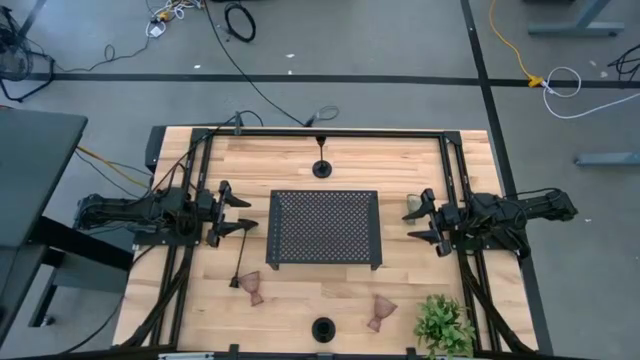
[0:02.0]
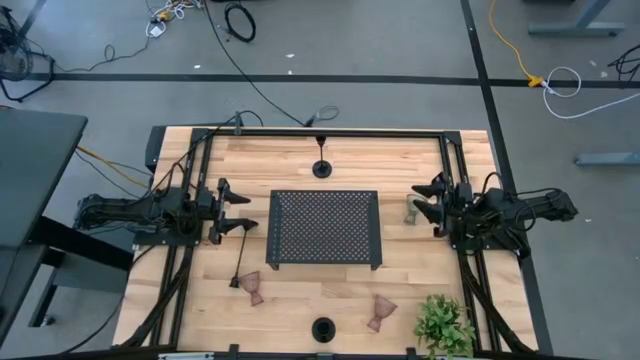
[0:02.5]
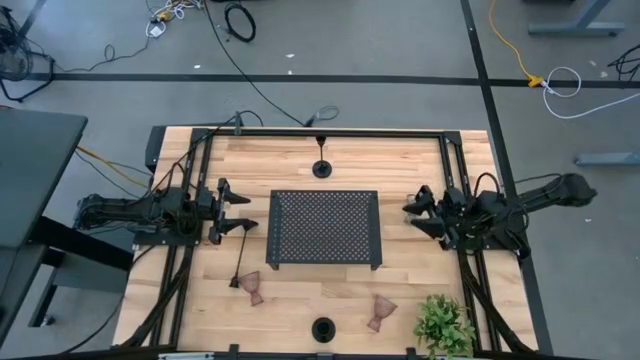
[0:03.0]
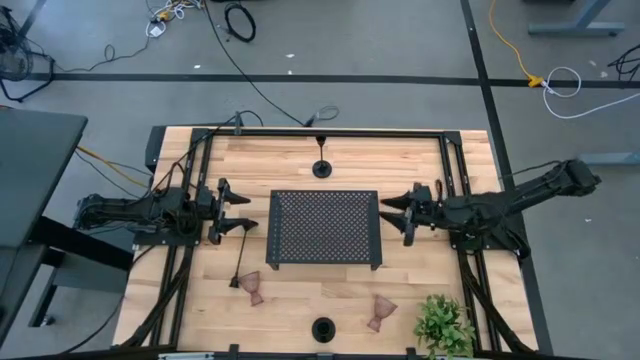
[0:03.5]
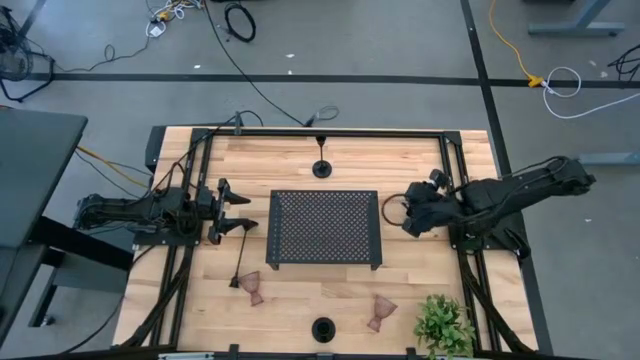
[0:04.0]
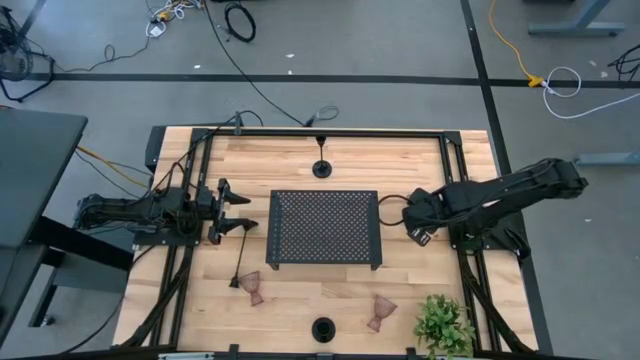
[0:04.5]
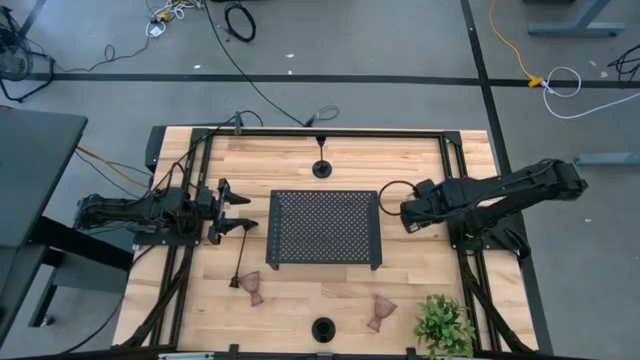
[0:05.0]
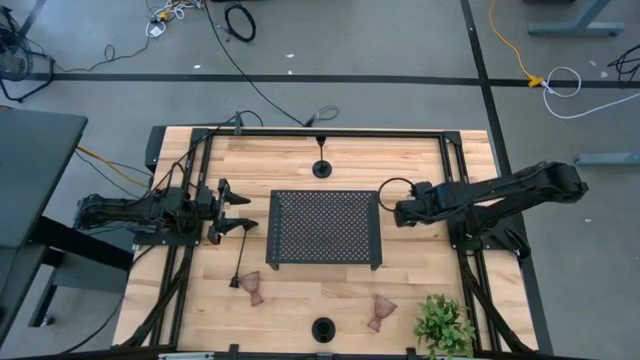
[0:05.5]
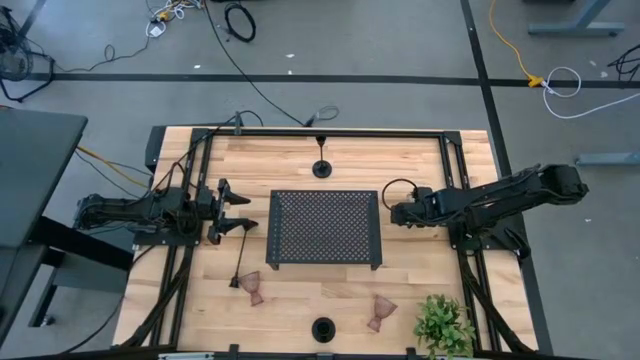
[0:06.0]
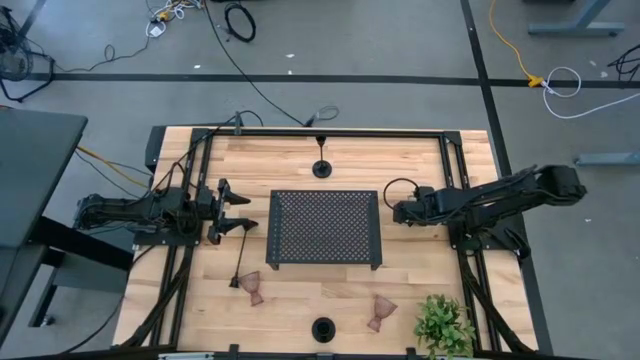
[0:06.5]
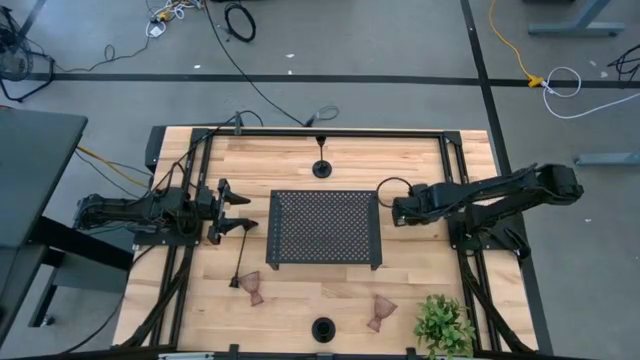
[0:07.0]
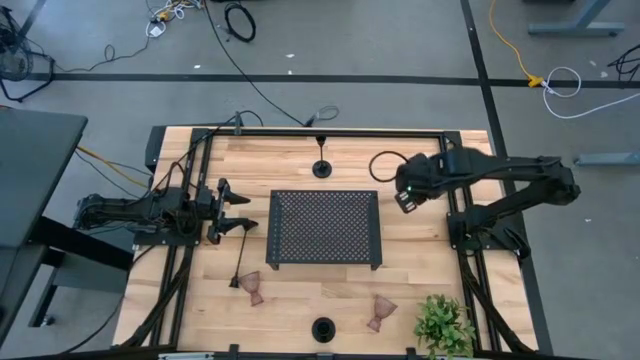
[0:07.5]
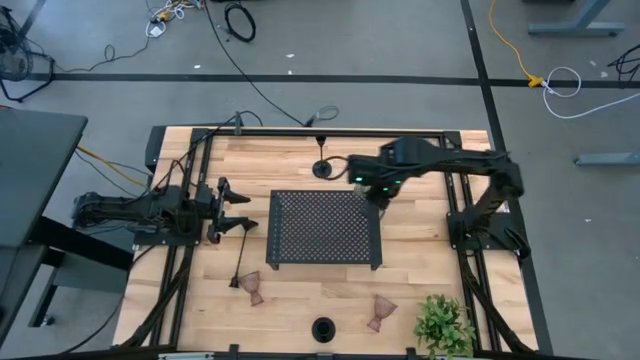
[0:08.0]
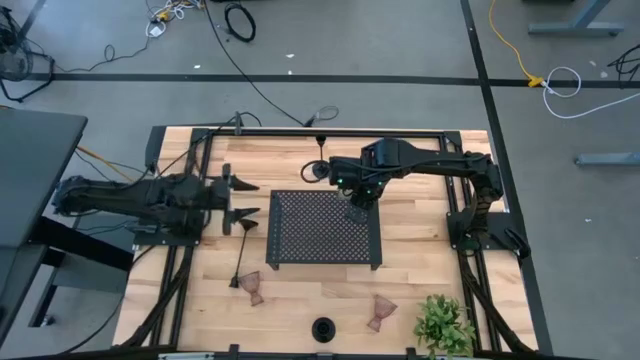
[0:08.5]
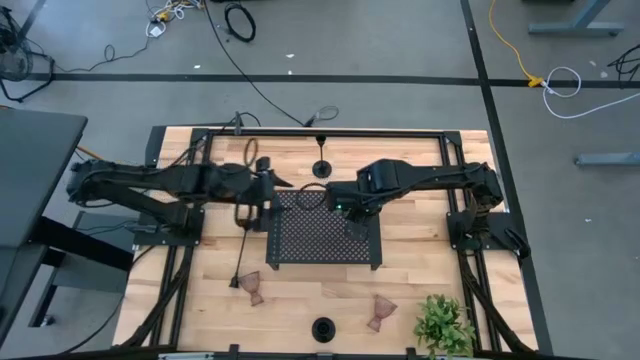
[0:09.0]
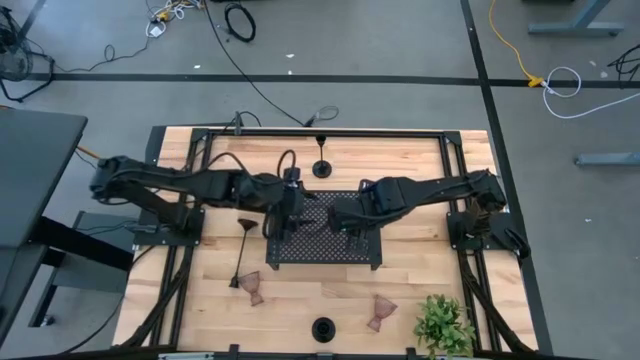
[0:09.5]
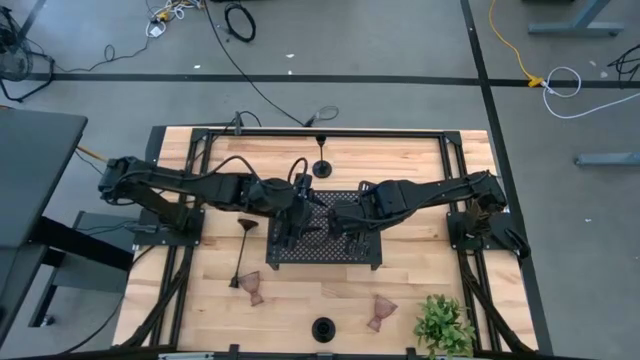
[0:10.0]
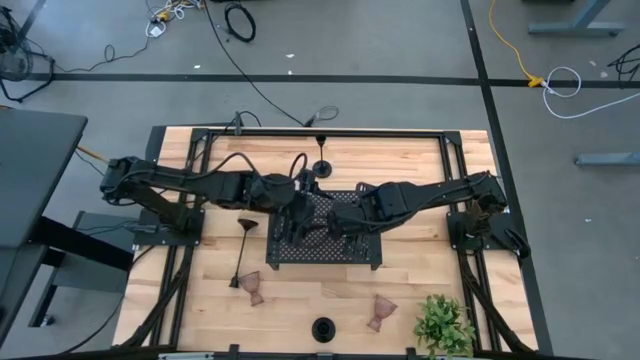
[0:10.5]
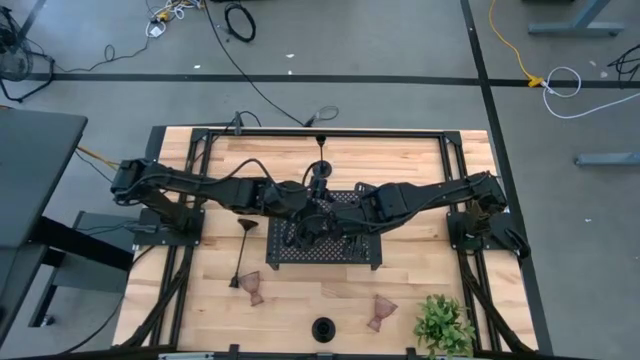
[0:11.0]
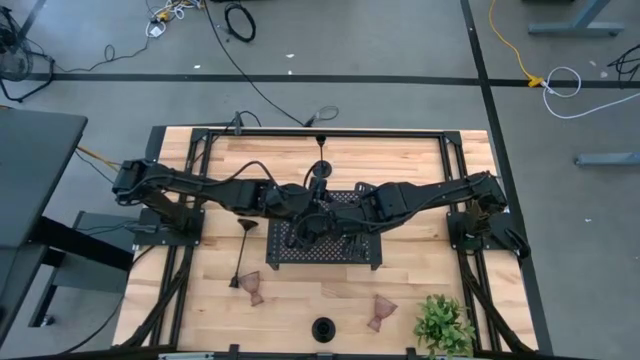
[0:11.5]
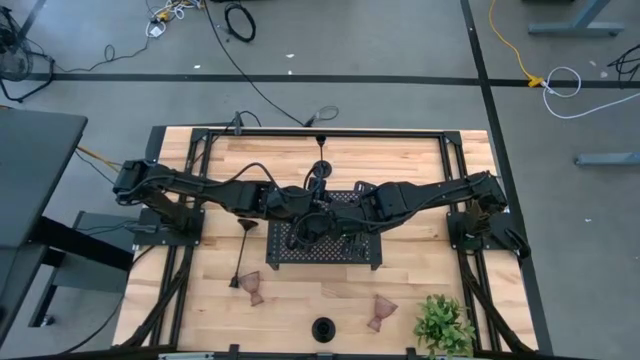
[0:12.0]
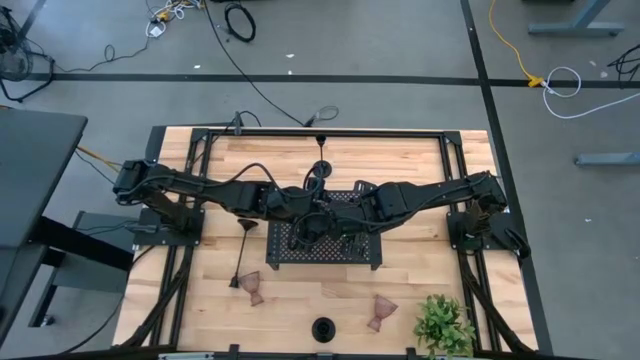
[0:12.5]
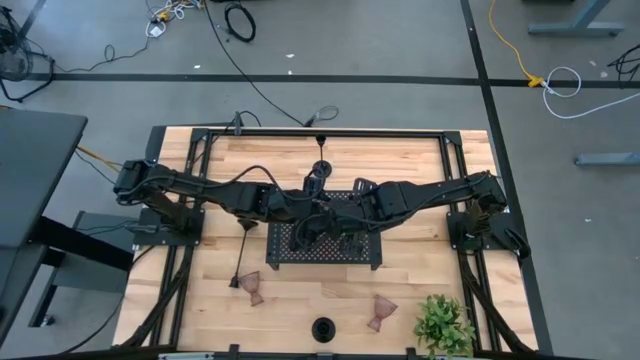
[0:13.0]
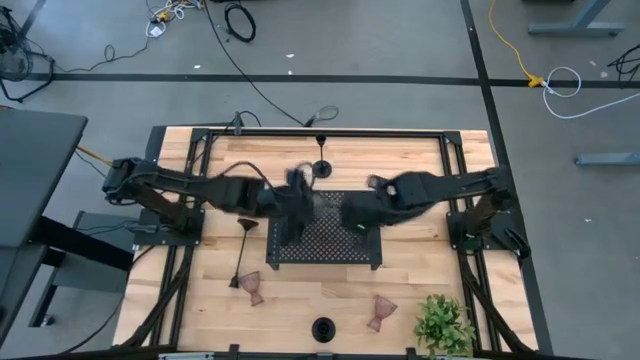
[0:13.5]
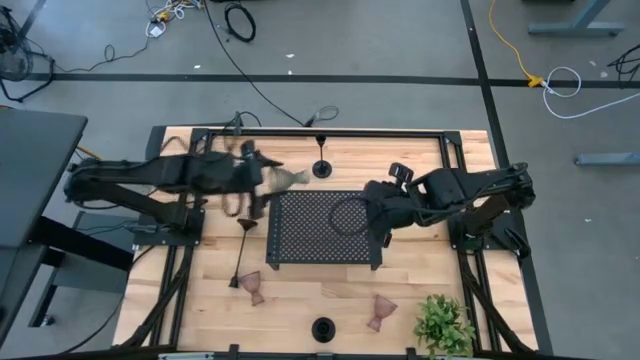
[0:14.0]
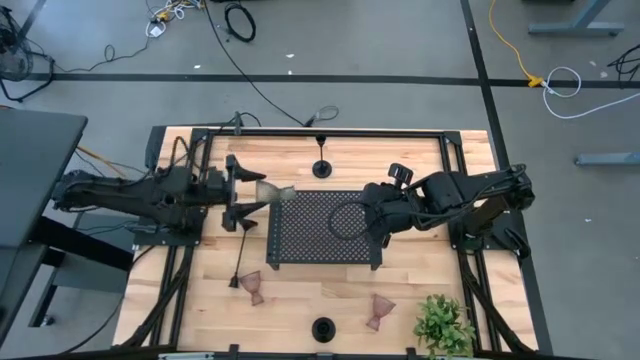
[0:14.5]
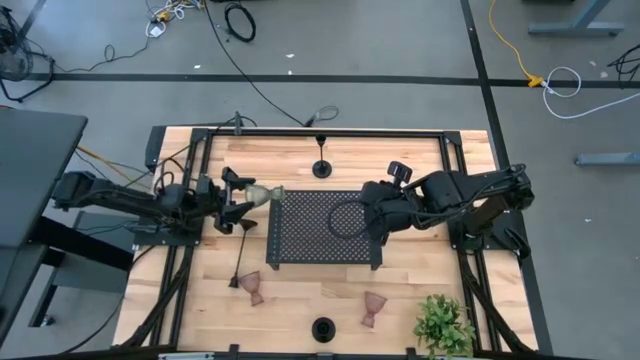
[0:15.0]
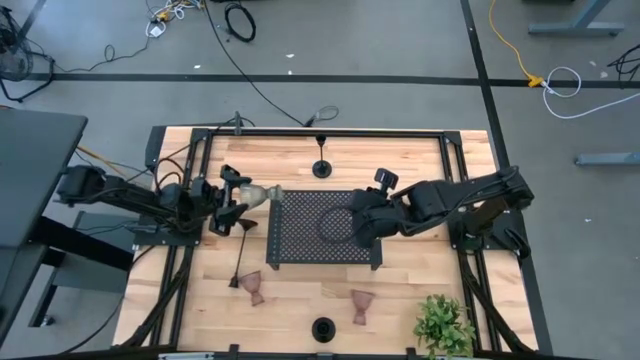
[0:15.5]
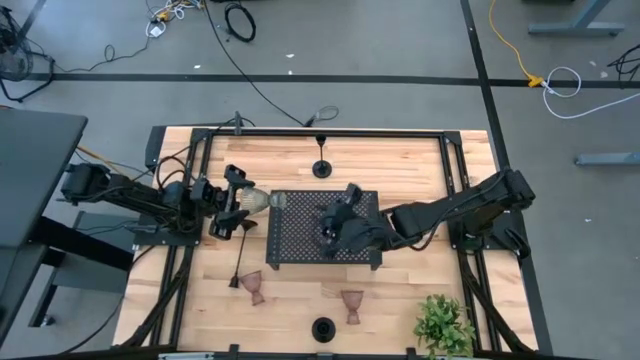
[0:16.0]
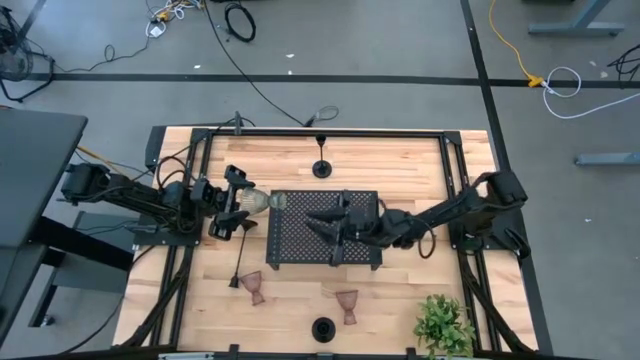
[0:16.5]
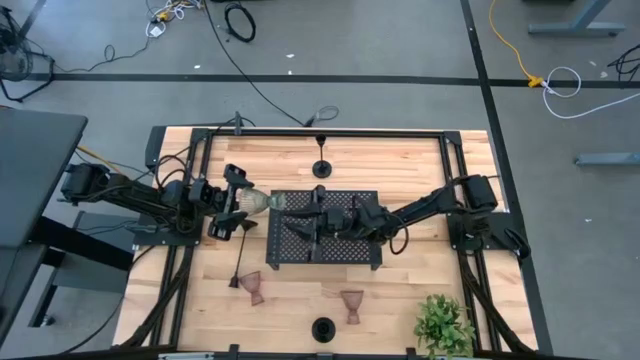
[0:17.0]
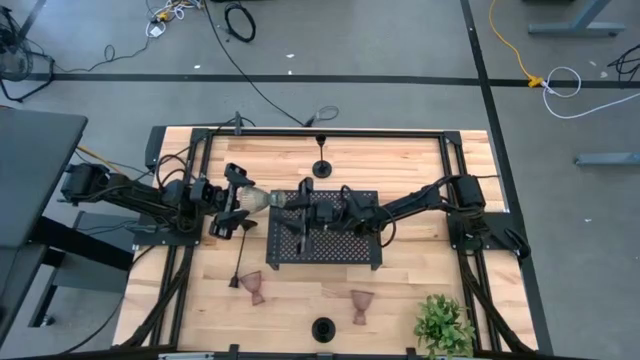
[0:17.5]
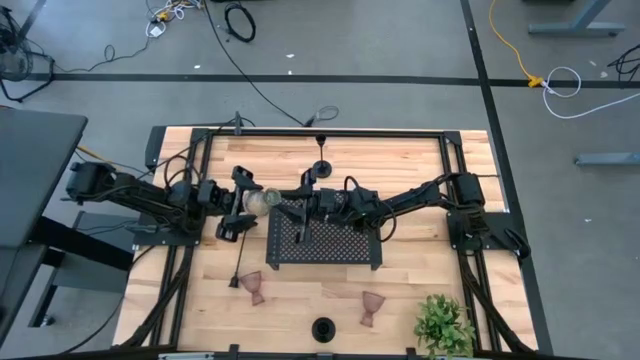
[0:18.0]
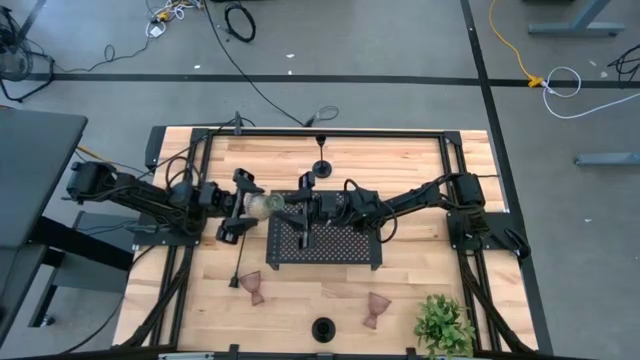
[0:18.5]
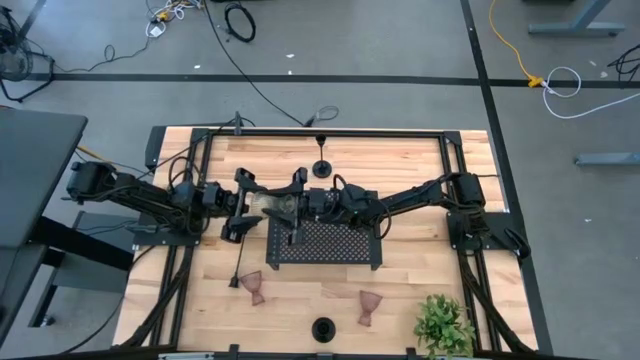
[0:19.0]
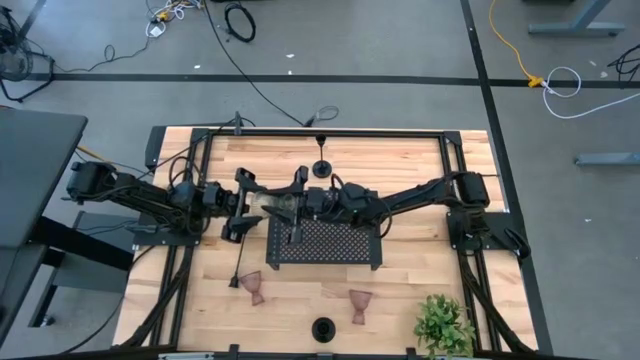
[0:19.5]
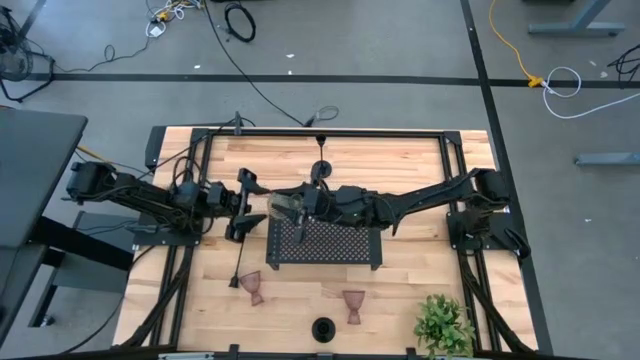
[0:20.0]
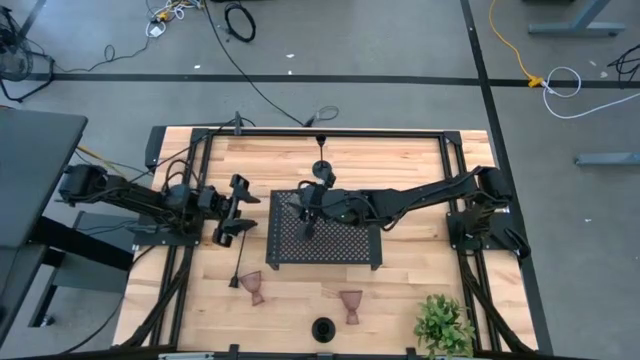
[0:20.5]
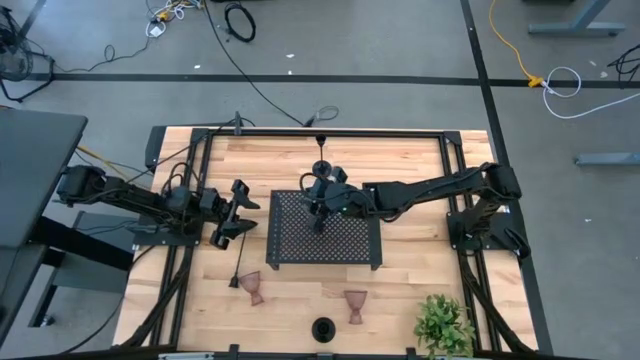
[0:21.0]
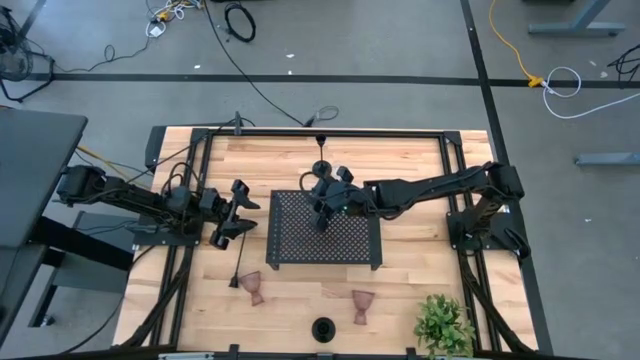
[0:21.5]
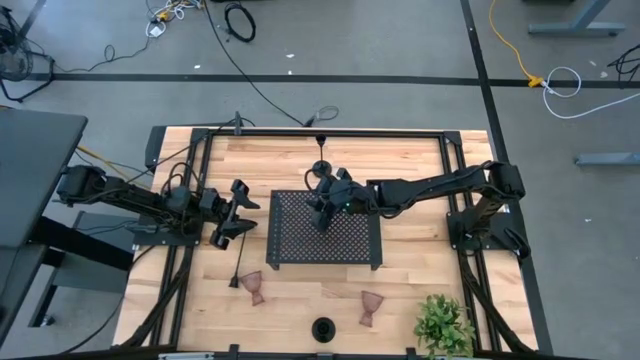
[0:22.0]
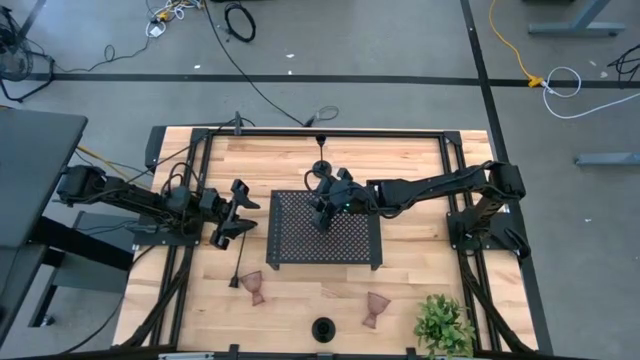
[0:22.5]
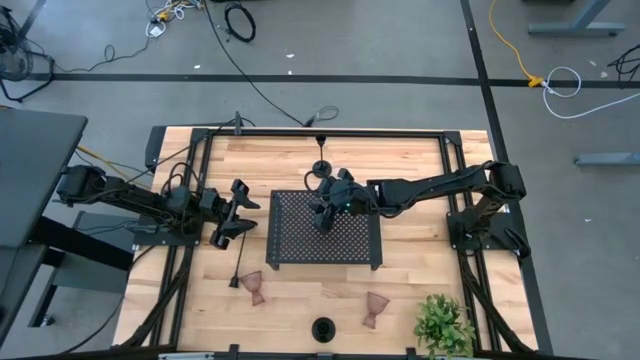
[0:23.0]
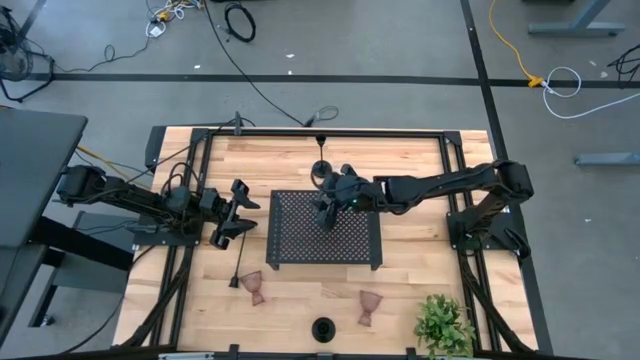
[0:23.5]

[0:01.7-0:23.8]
Task: Pick & Place candle stick holders
Put the green candle holder on the shelf
